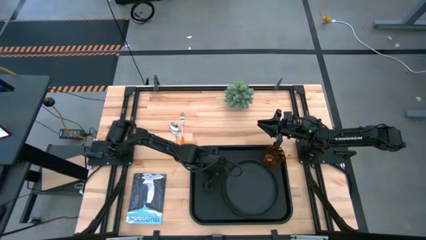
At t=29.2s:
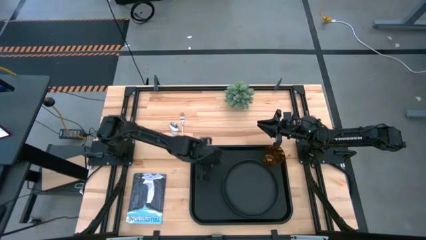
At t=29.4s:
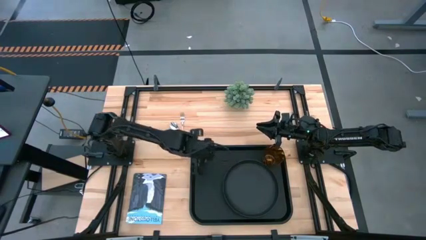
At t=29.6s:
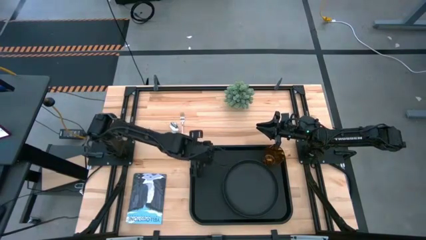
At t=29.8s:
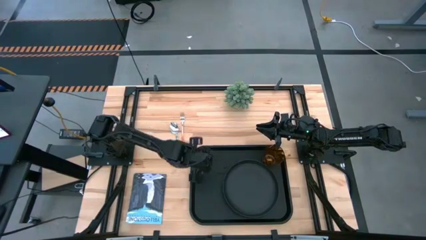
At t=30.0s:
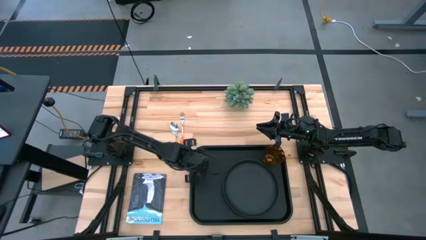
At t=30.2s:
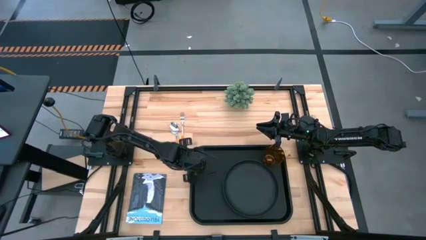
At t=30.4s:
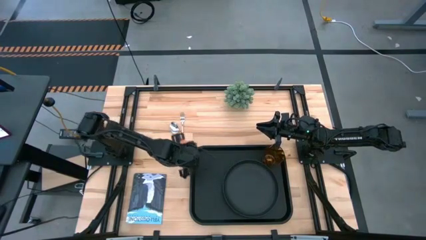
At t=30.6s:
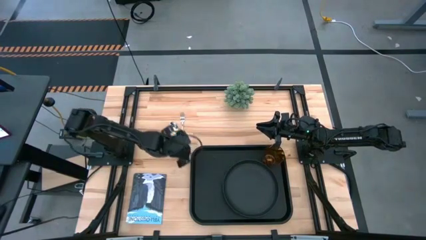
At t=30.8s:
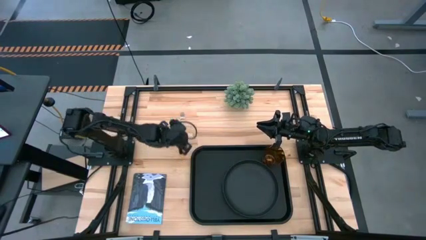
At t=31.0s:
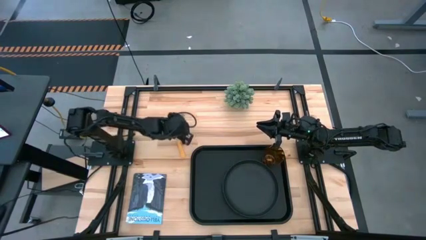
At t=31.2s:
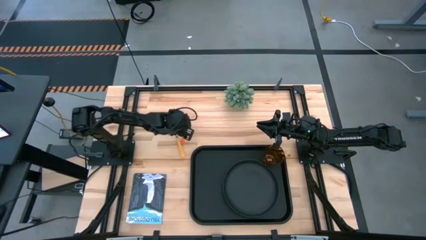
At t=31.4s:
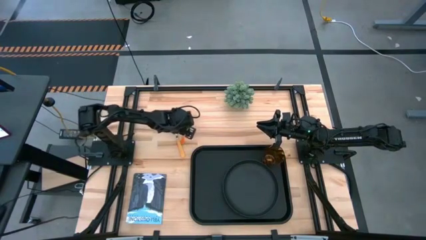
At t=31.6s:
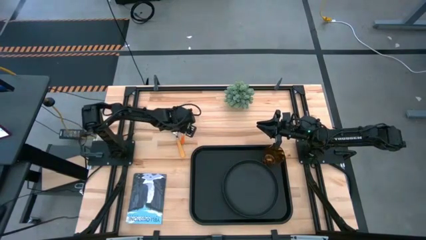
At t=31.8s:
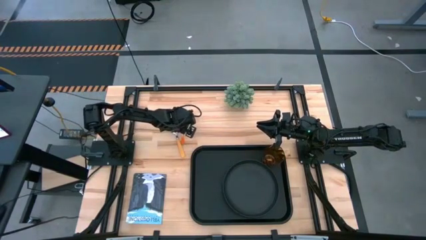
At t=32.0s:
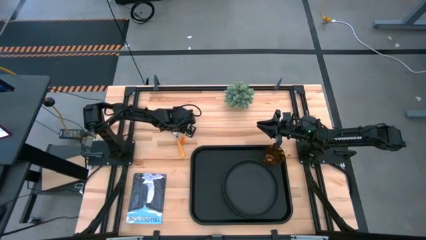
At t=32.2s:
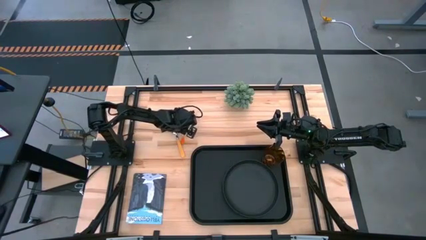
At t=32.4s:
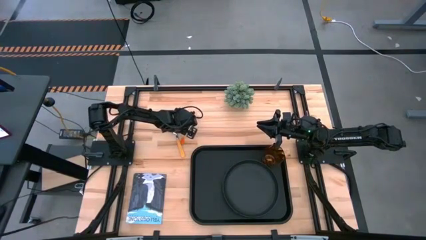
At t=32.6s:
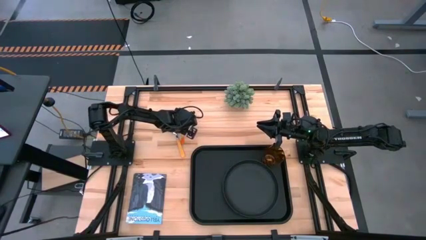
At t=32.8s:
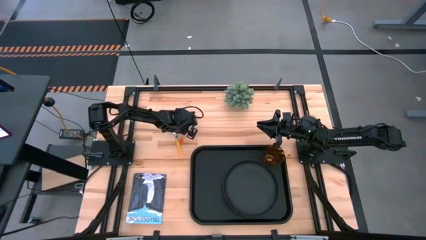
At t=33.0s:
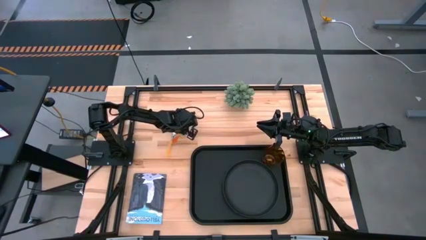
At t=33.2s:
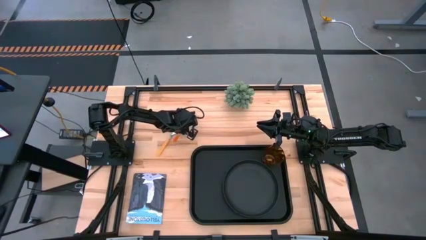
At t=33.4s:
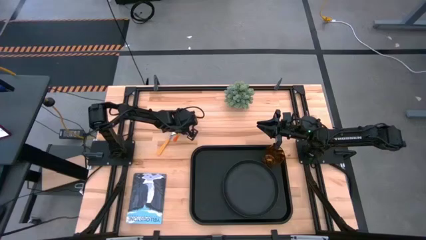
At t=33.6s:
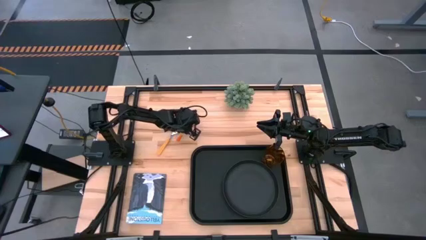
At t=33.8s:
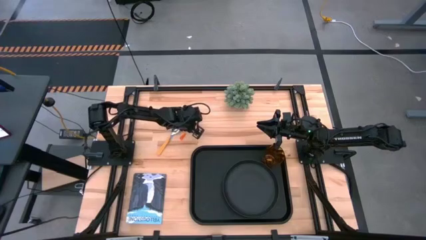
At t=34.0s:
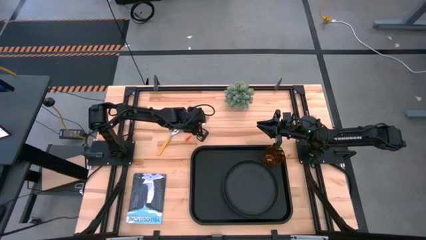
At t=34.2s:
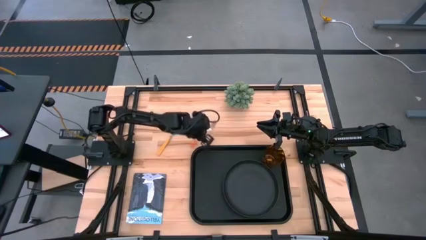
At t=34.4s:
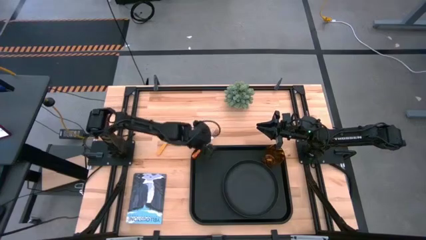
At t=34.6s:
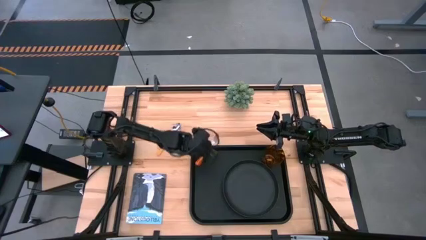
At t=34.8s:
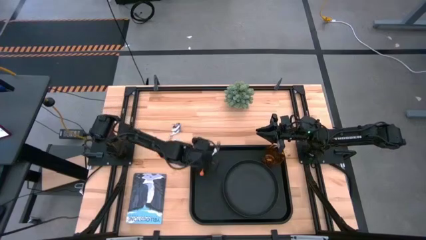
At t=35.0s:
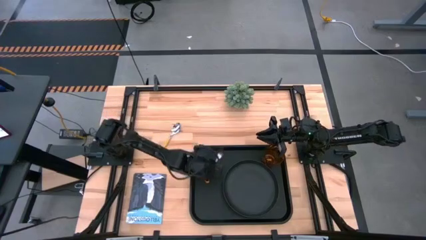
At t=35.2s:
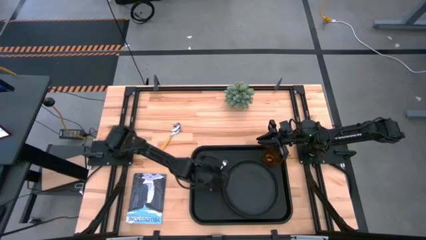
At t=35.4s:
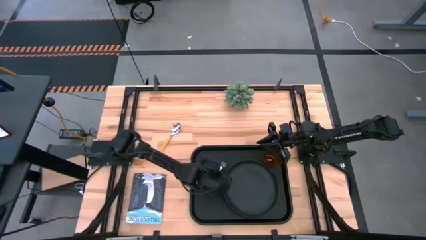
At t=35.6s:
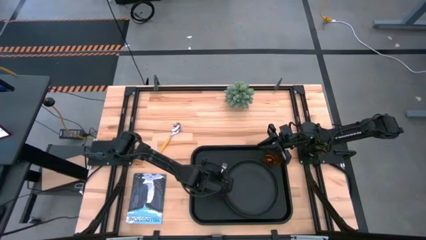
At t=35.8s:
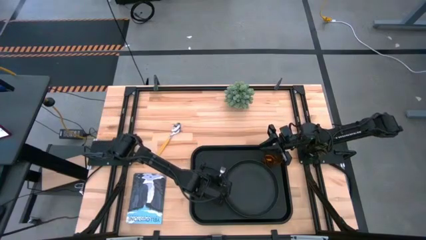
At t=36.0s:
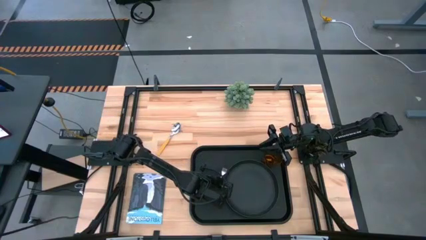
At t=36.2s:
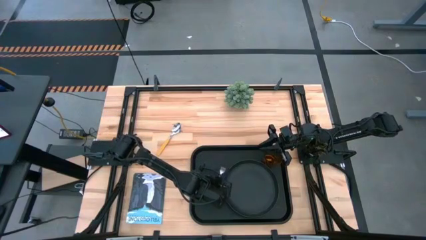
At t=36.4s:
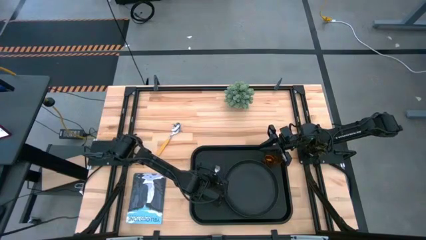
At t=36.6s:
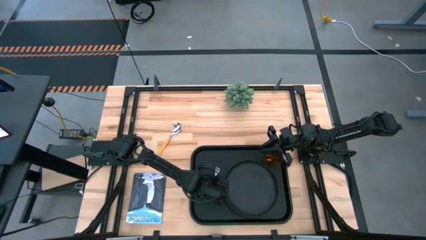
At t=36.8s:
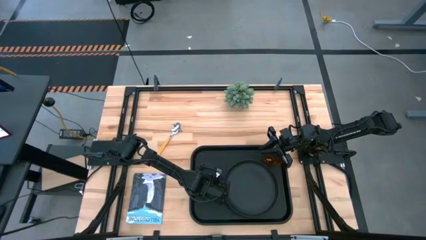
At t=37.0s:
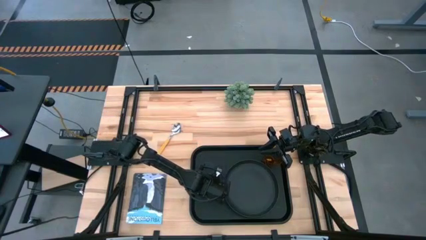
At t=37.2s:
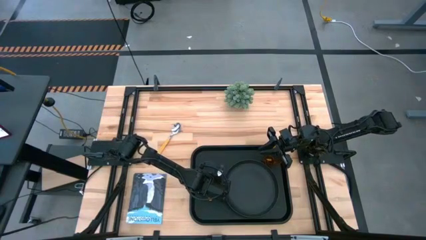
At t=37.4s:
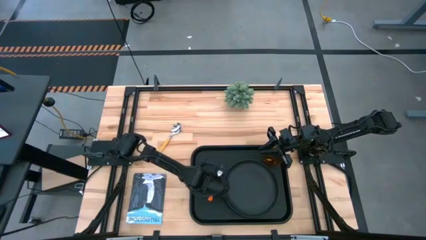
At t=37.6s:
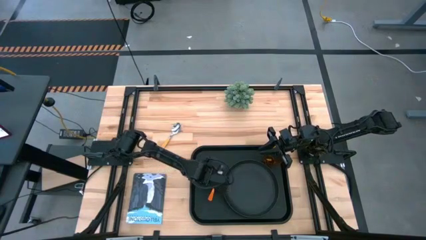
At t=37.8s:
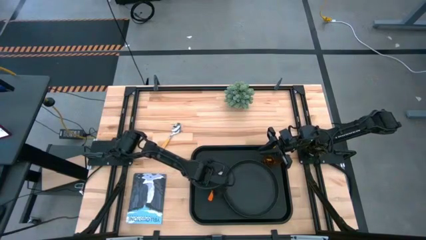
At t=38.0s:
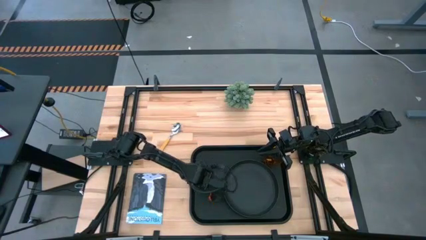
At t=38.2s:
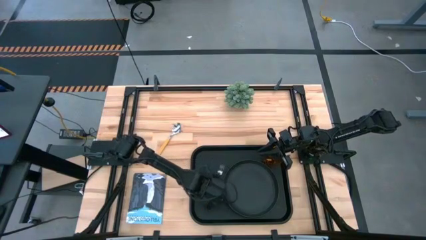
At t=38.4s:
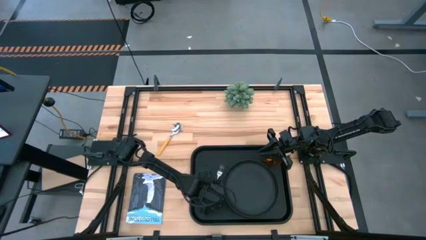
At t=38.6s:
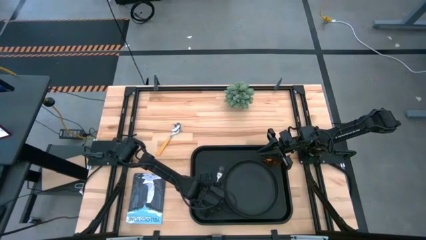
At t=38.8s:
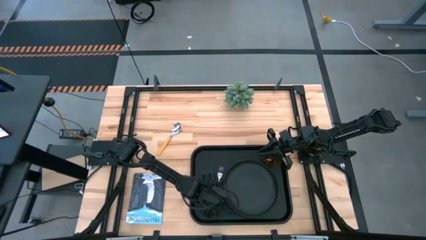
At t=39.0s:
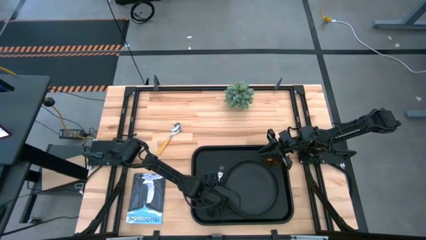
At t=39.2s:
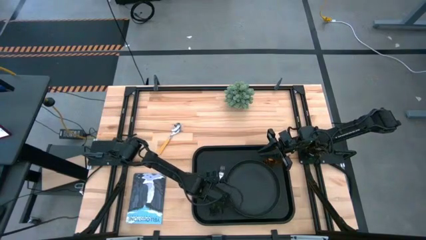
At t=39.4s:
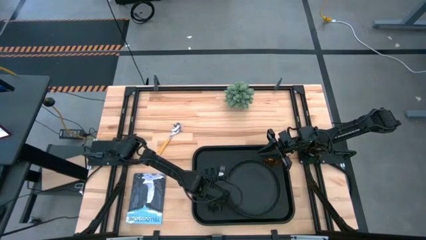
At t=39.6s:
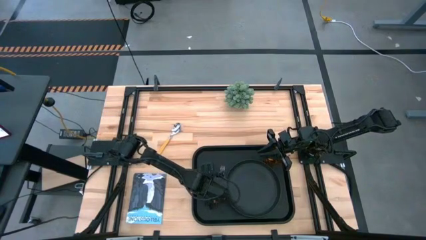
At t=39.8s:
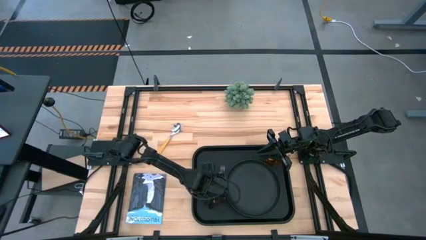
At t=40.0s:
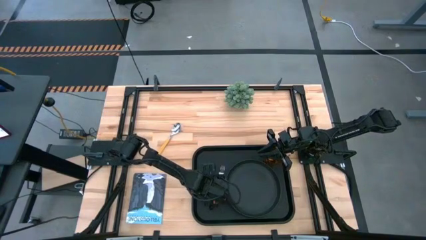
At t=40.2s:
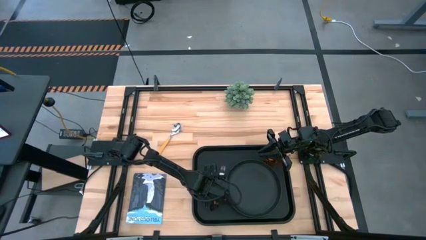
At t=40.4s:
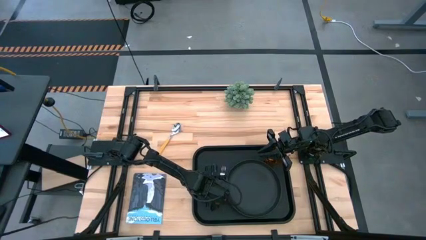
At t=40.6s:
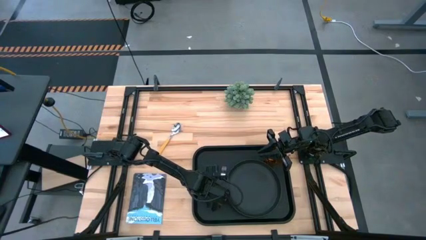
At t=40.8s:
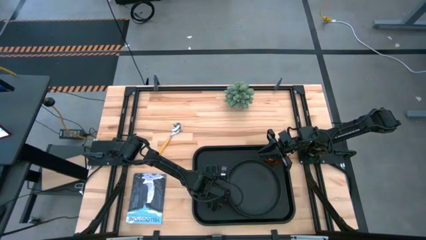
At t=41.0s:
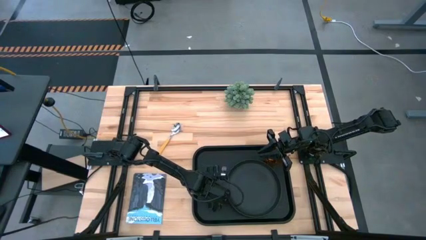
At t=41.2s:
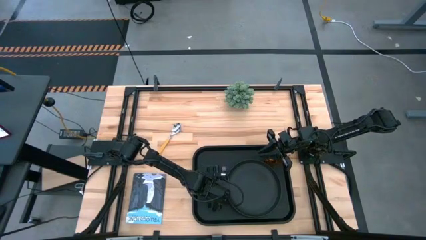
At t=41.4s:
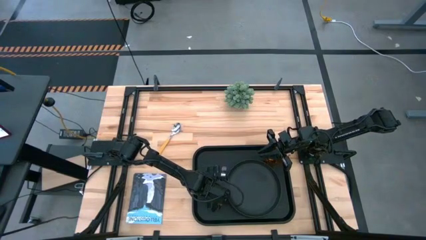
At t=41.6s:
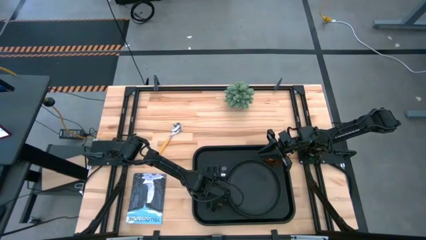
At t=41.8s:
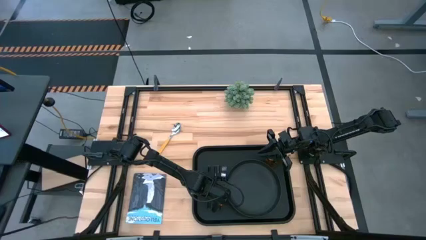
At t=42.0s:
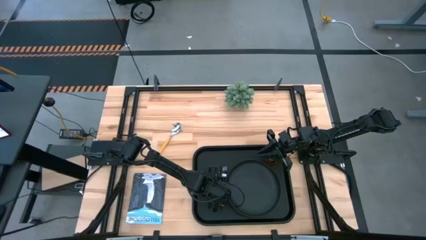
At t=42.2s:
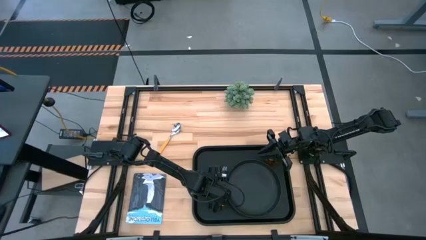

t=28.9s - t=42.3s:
Task: Pick and place plate/cup/fork/spoon on tray
Put the orange fork on the black serving tray to the left of the black plate
